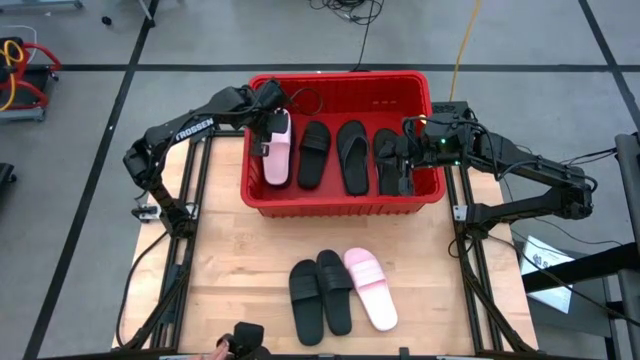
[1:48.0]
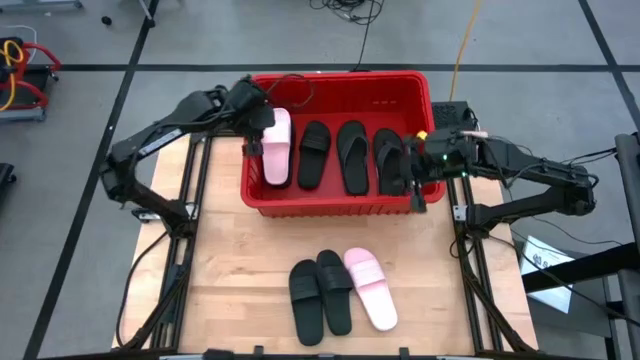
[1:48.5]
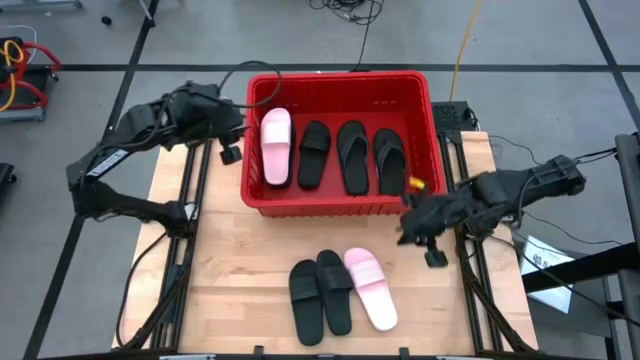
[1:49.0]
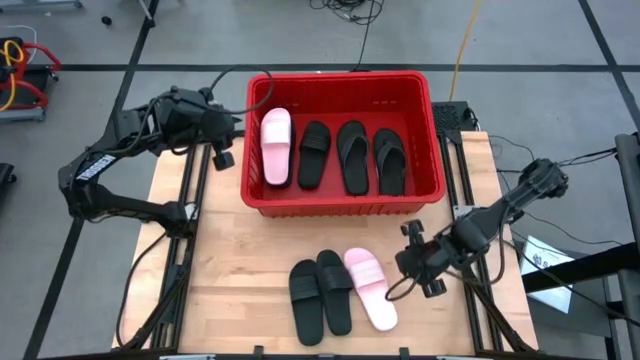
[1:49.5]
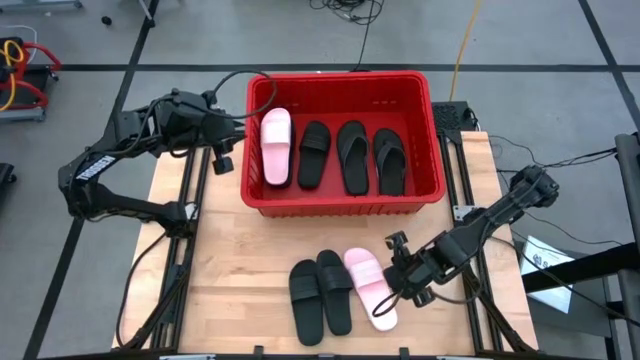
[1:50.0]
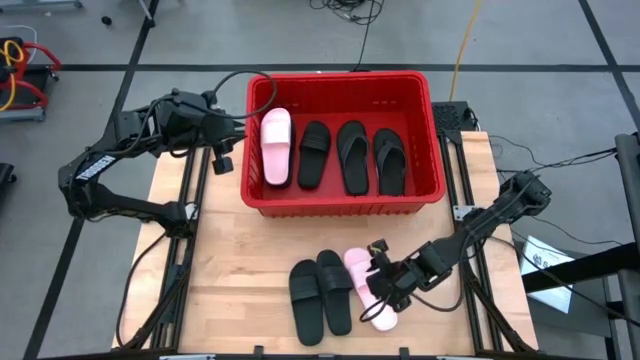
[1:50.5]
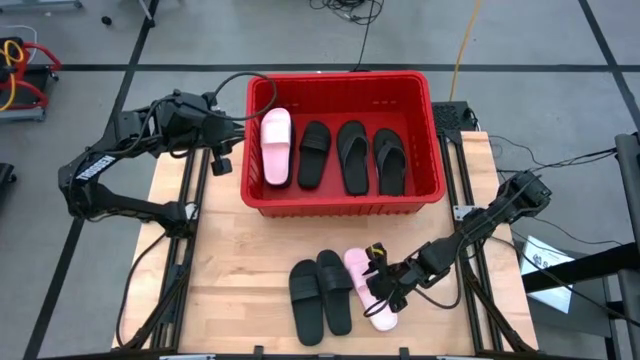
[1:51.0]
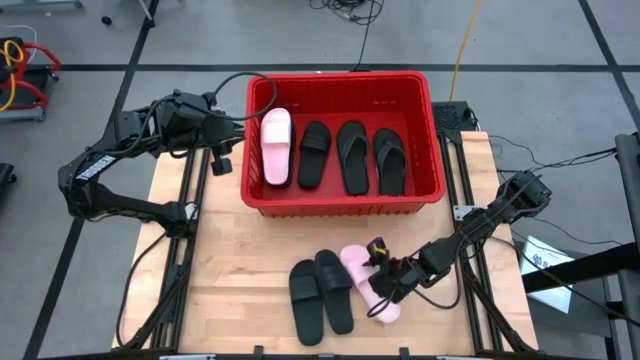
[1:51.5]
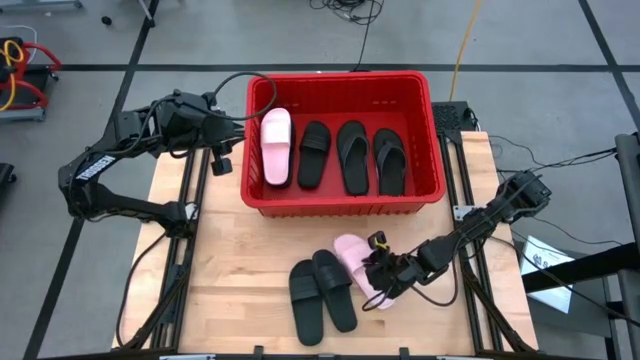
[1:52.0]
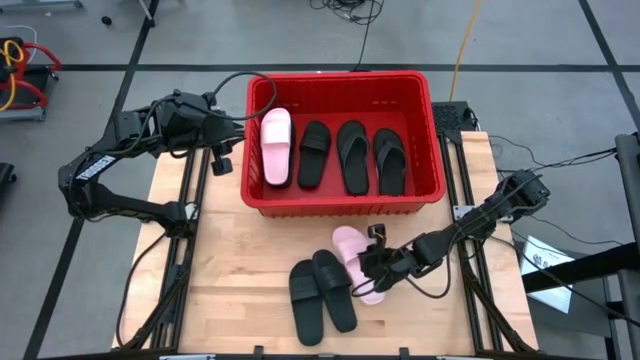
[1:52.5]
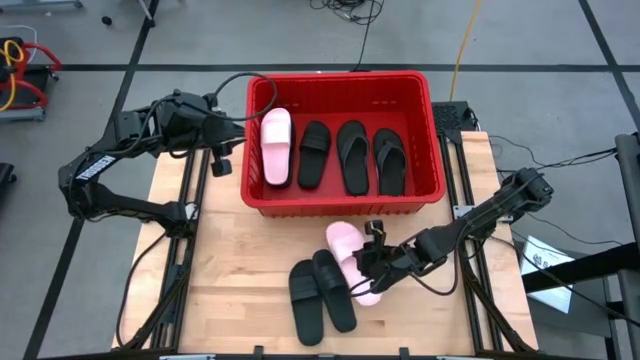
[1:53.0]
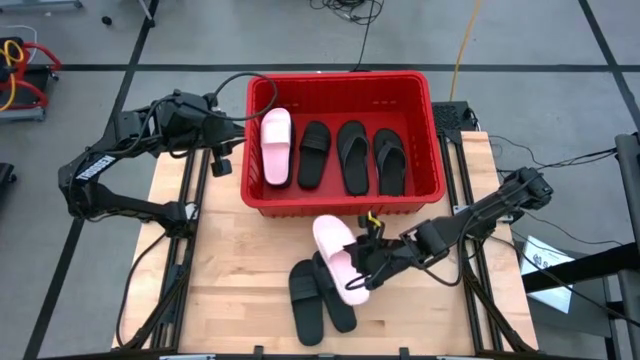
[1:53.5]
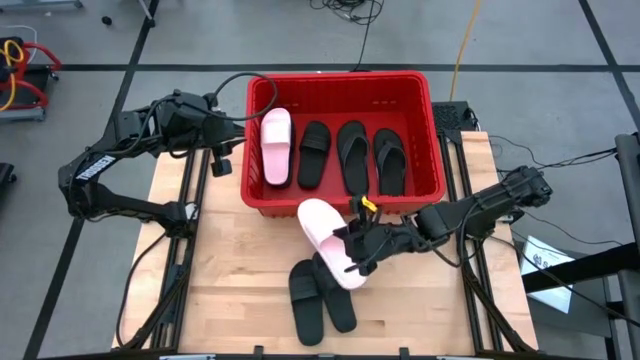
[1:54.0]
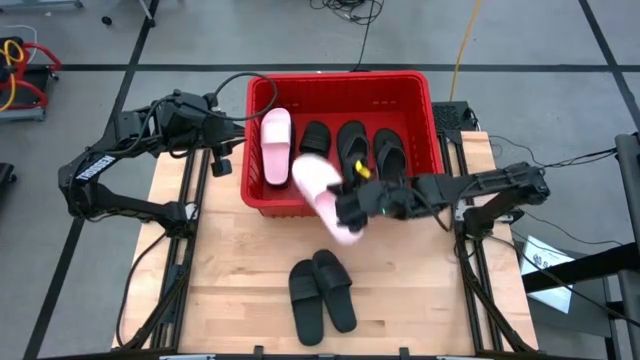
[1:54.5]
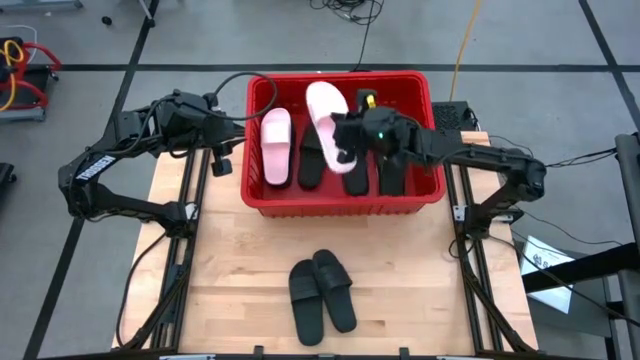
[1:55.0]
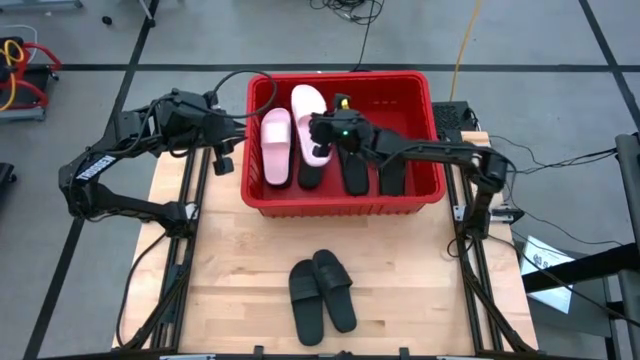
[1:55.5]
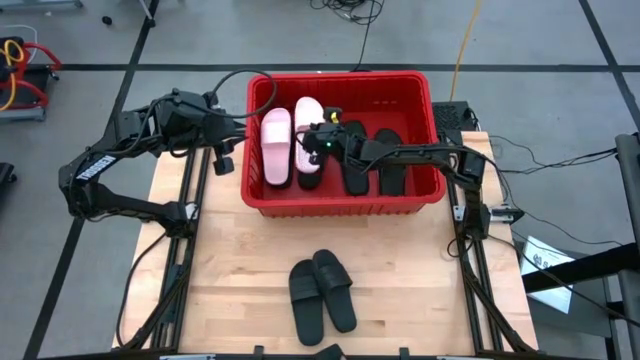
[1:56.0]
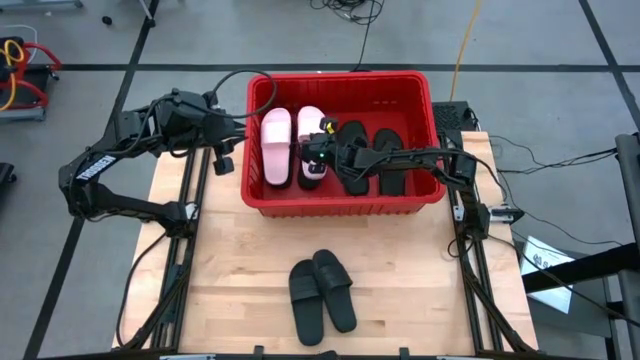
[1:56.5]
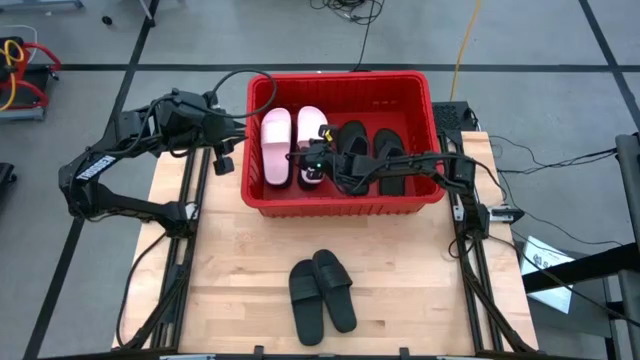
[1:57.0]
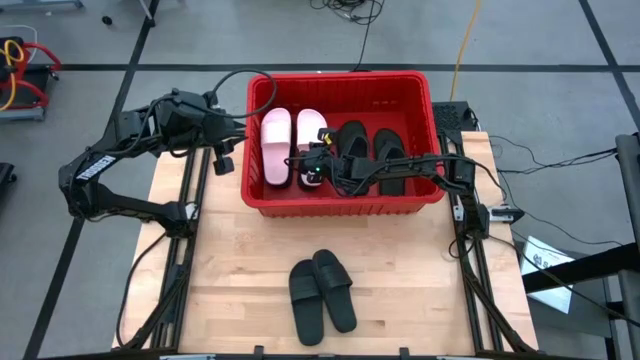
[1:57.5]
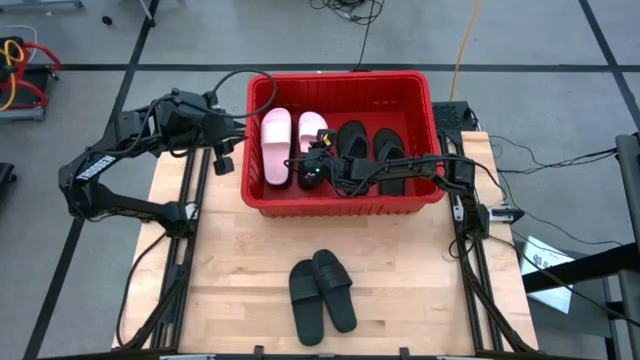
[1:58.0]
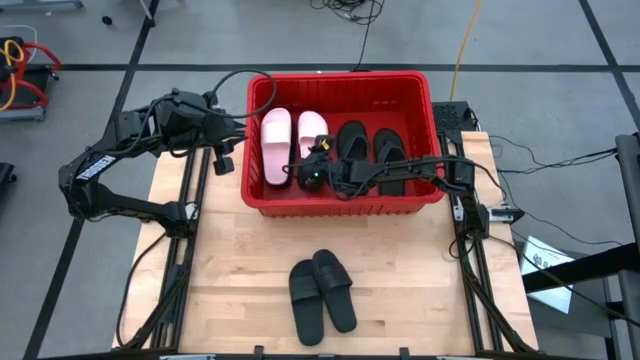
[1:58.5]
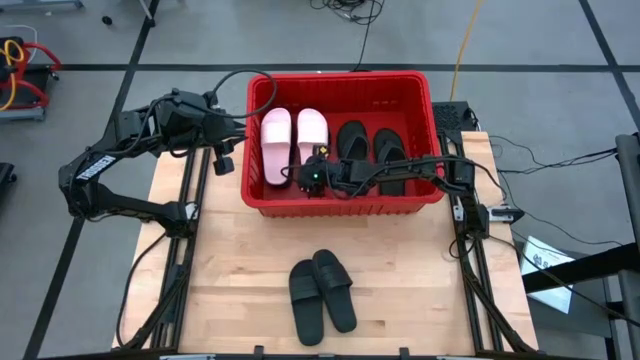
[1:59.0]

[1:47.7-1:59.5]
Task: Pick and place slides into bin
Put the pink slide into the red container

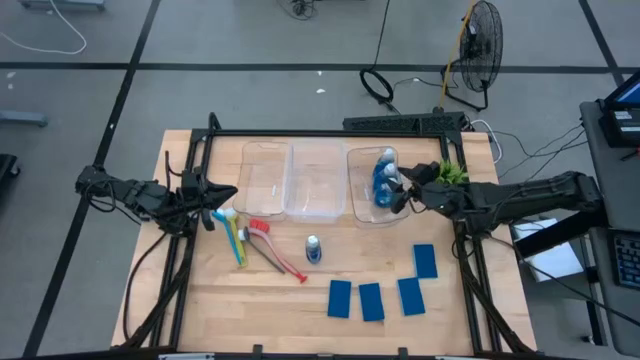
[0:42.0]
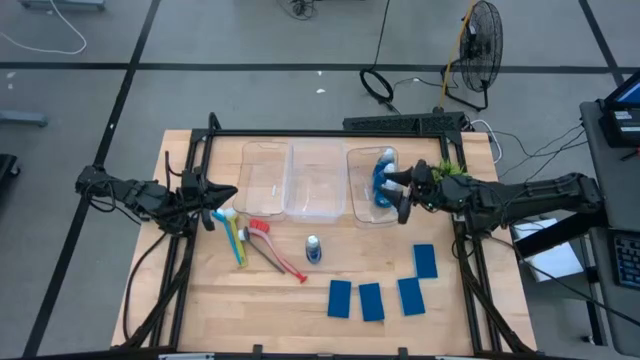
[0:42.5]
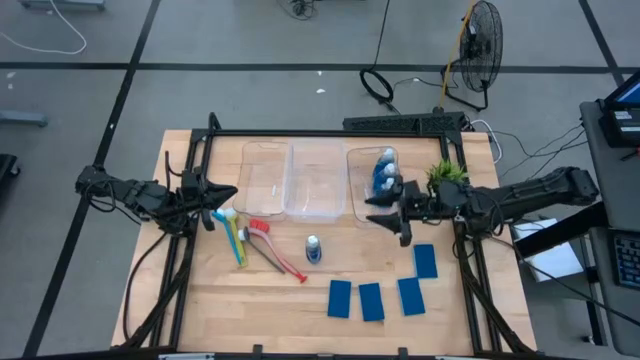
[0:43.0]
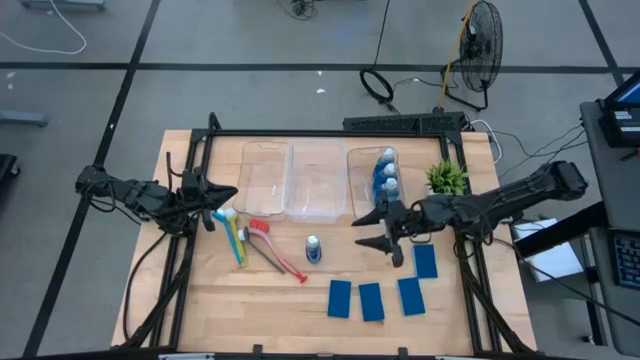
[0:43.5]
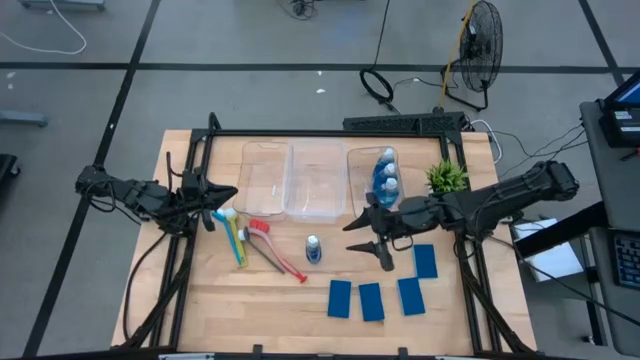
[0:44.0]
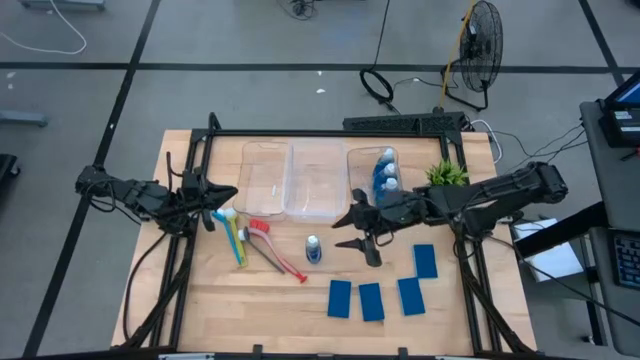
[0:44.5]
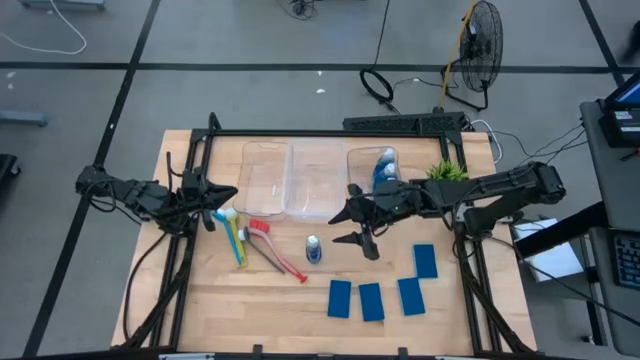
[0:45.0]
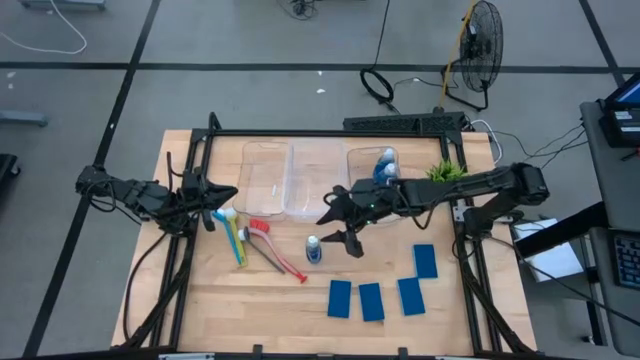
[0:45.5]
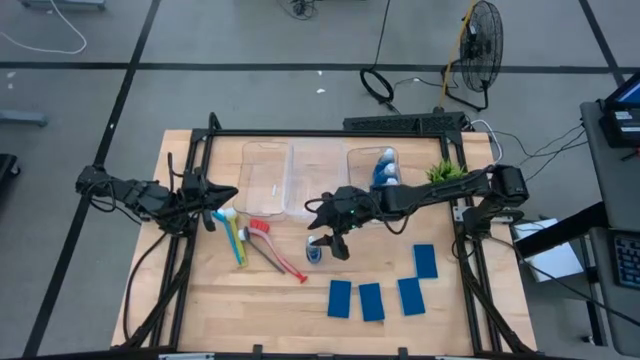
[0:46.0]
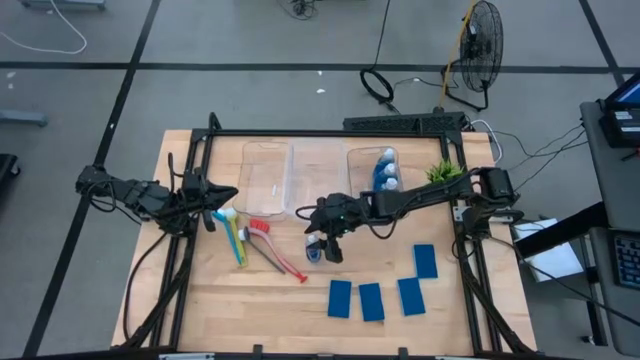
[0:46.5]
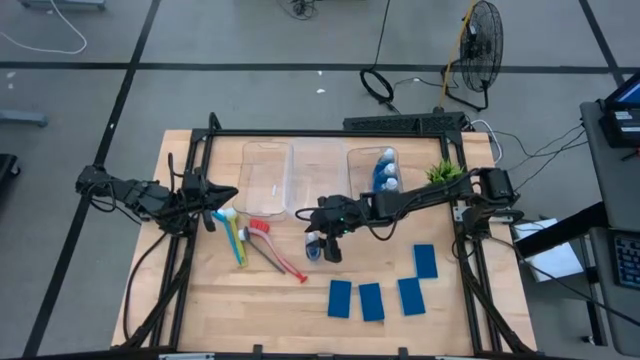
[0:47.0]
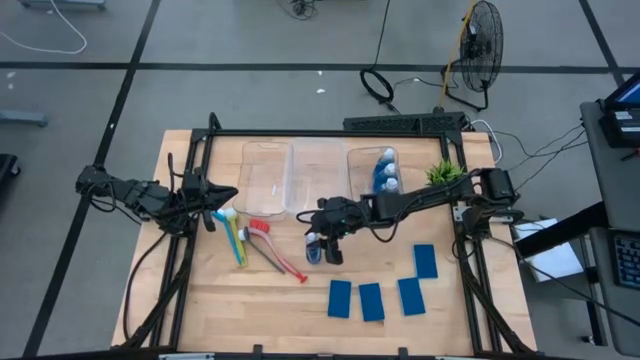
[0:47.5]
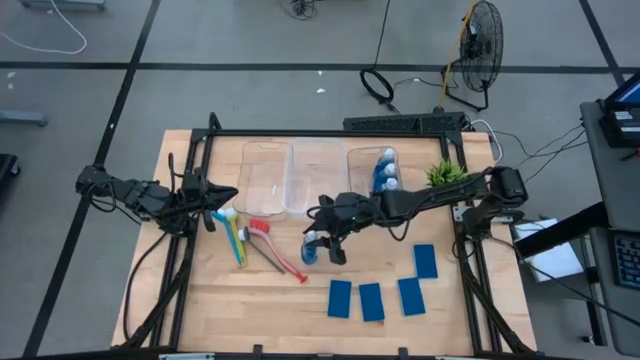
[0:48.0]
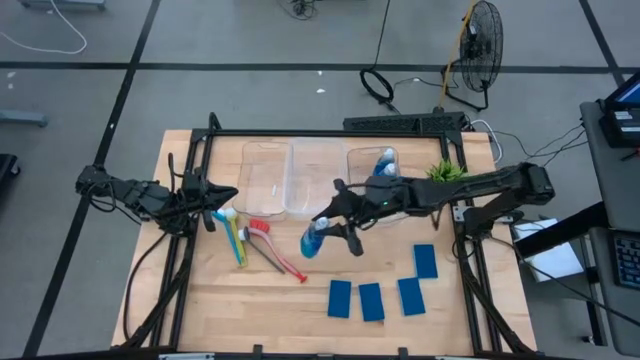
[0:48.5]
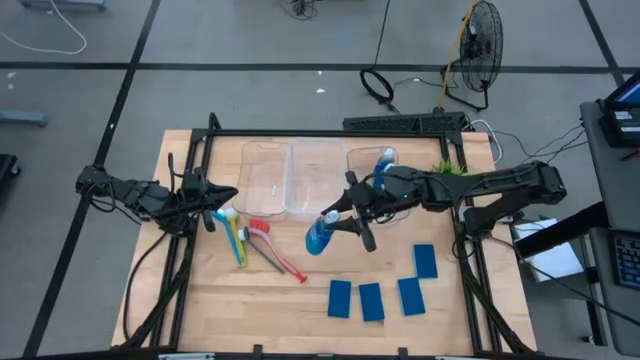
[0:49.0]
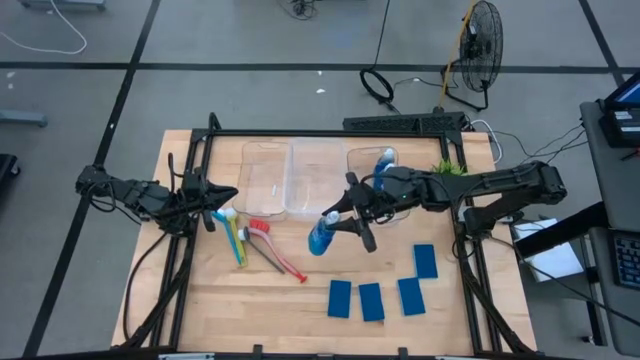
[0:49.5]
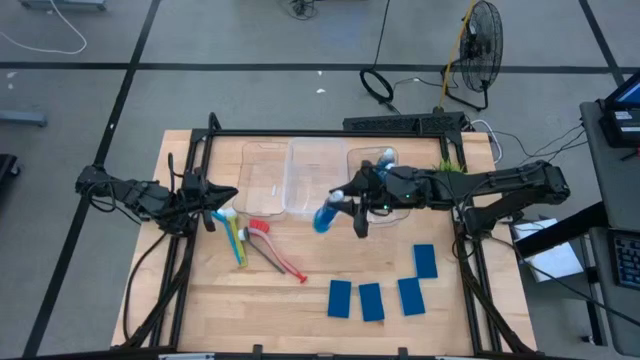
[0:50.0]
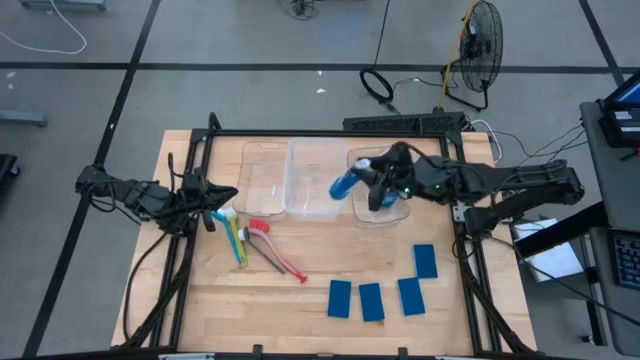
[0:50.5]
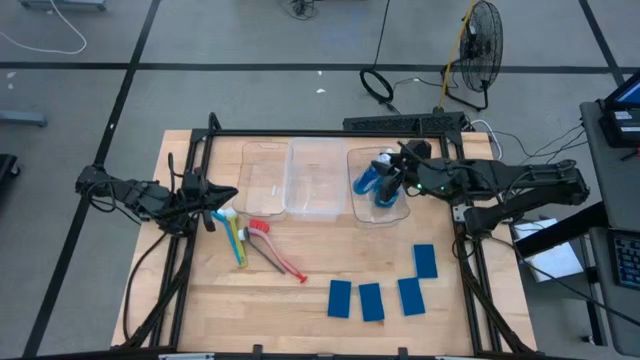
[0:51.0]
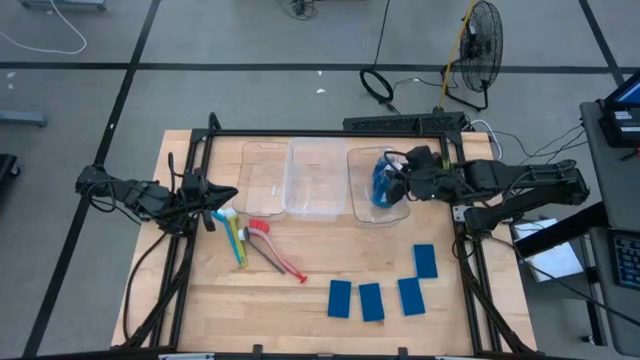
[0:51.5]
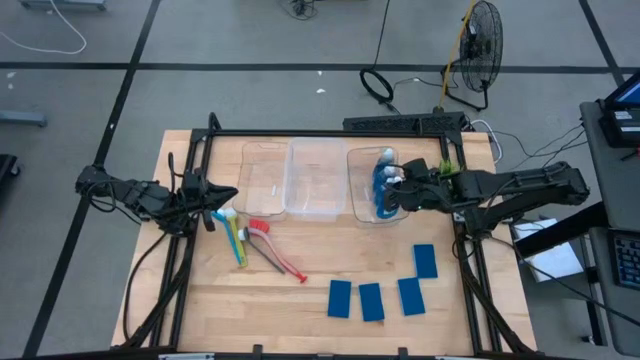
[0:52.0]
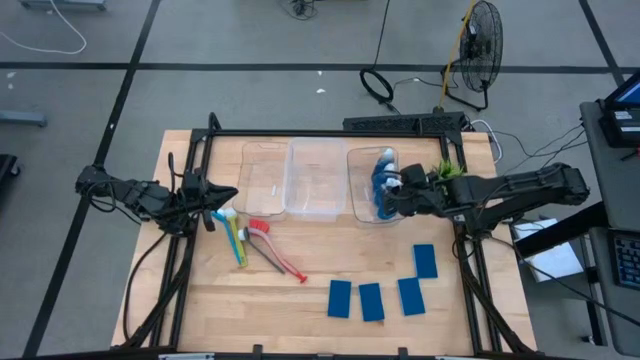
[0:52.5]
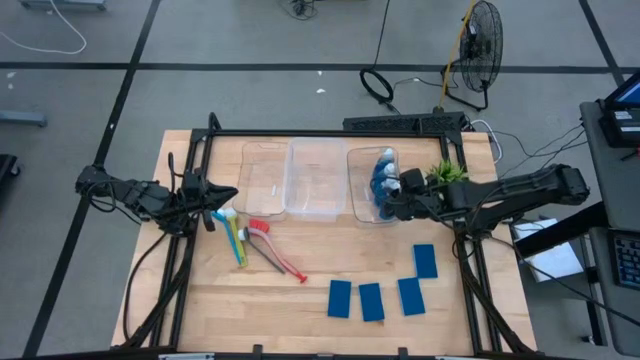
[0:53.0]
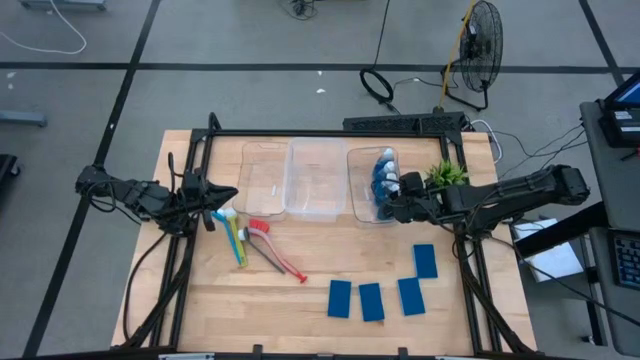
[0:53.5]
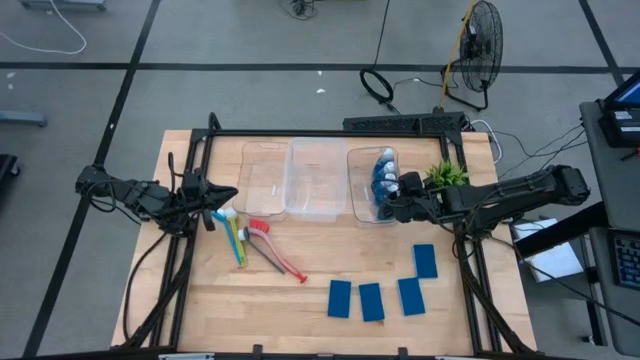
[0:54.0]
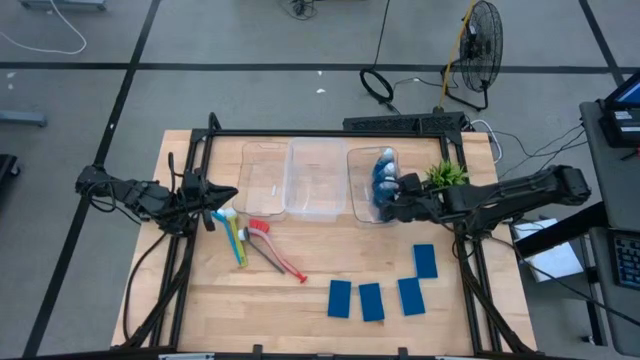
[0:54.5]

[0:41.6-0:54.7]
Task: Pick & Place Kitchen Sink Supplies
Put the blue dishwashing liquid bottle into the right transparent bin
